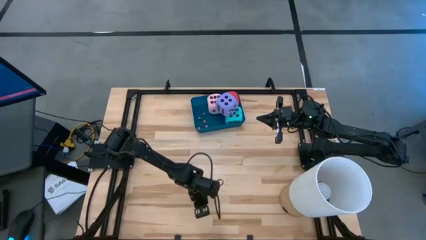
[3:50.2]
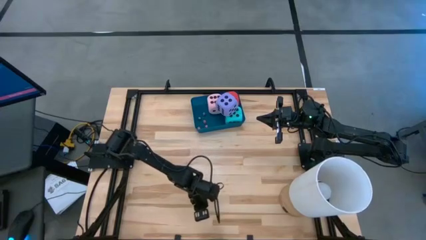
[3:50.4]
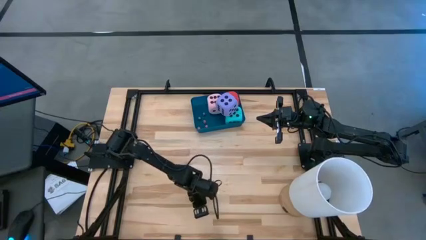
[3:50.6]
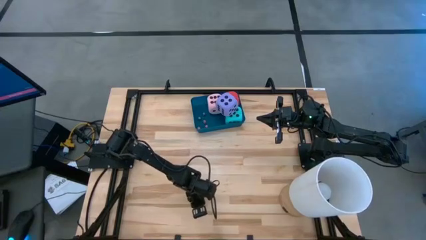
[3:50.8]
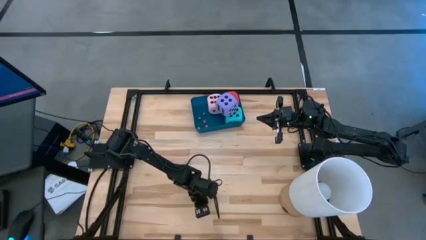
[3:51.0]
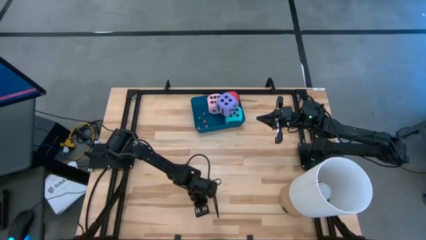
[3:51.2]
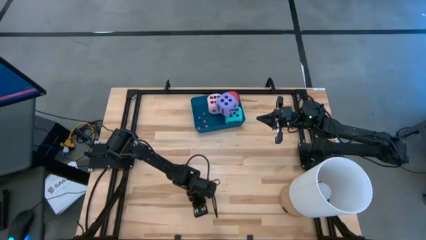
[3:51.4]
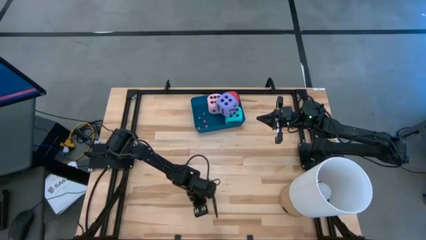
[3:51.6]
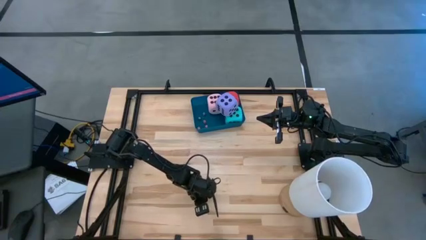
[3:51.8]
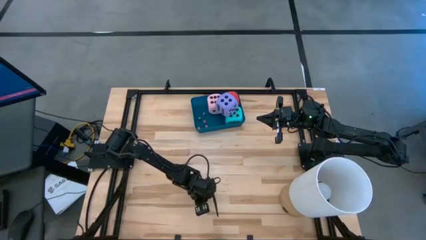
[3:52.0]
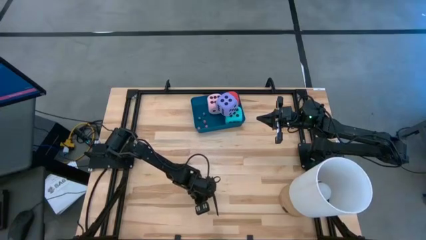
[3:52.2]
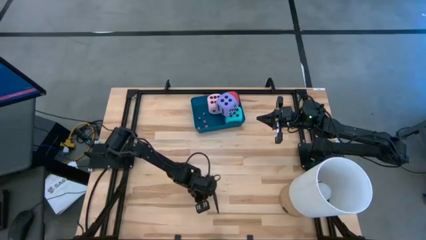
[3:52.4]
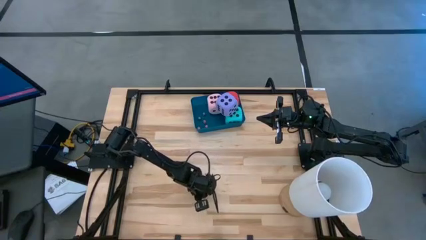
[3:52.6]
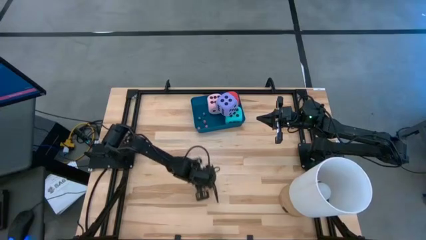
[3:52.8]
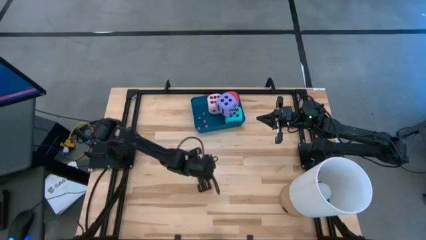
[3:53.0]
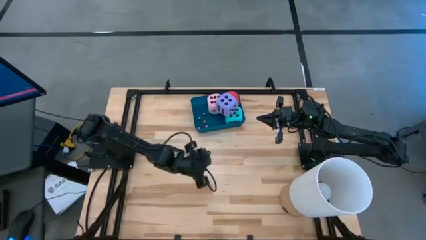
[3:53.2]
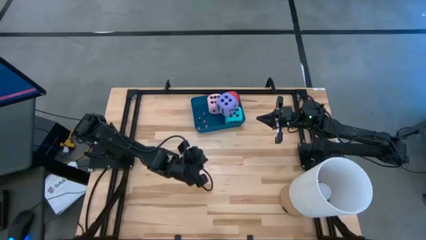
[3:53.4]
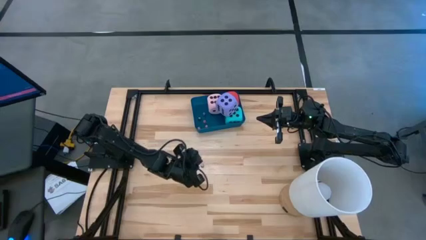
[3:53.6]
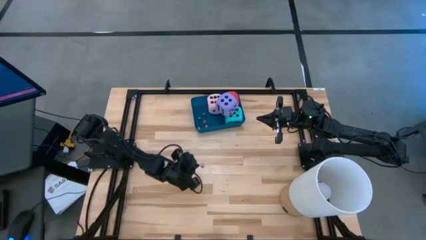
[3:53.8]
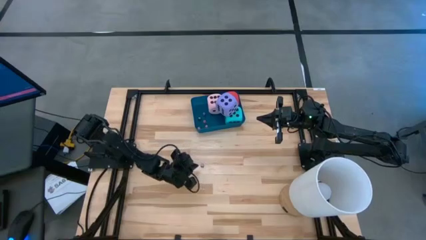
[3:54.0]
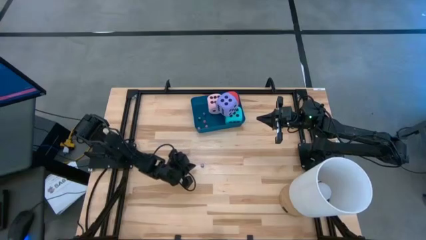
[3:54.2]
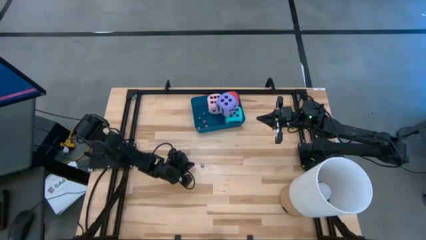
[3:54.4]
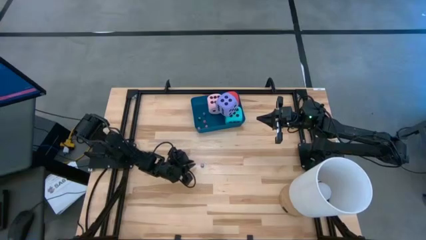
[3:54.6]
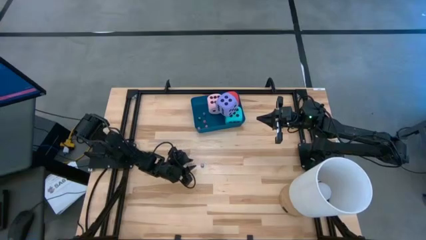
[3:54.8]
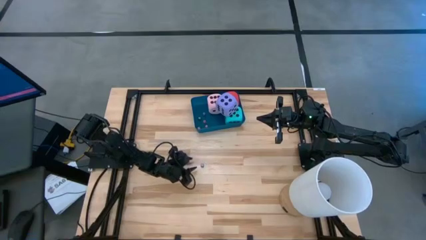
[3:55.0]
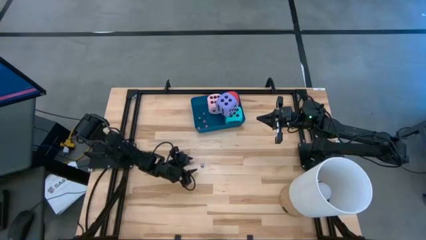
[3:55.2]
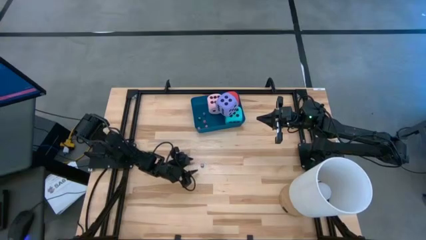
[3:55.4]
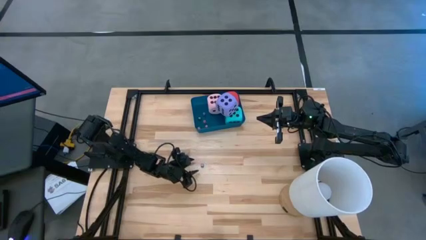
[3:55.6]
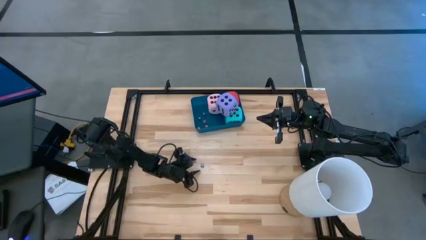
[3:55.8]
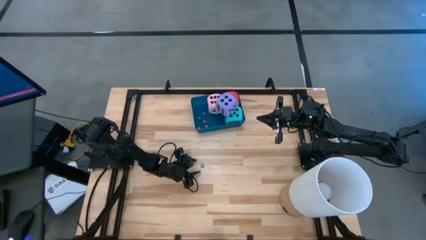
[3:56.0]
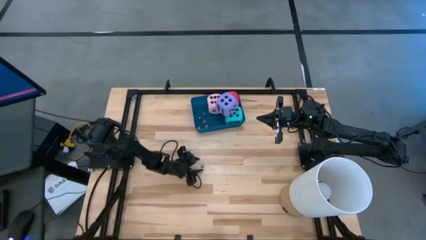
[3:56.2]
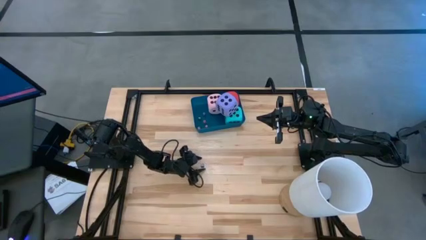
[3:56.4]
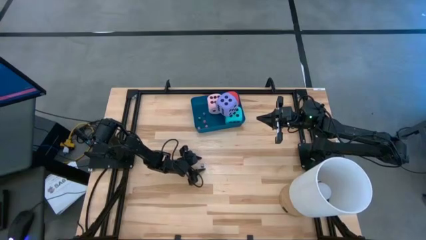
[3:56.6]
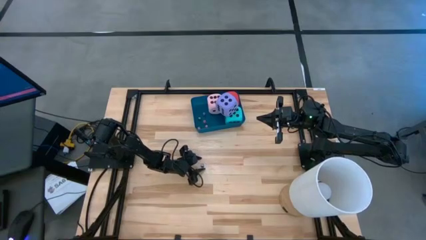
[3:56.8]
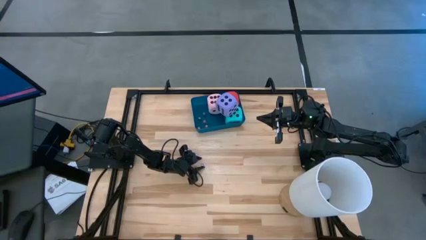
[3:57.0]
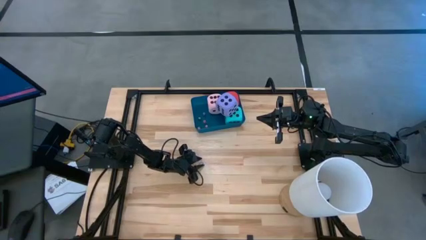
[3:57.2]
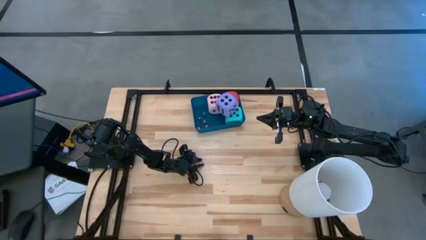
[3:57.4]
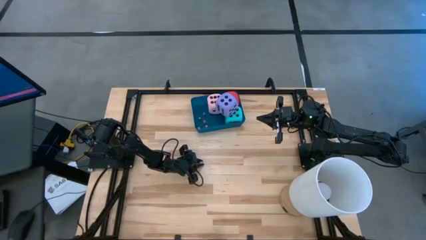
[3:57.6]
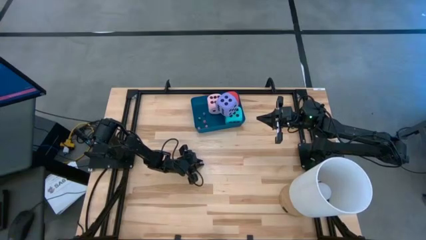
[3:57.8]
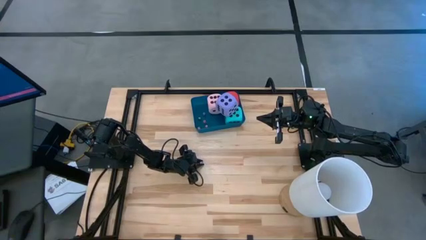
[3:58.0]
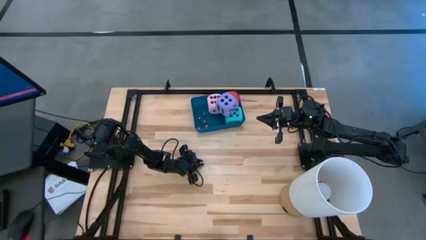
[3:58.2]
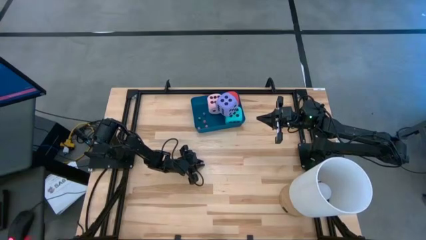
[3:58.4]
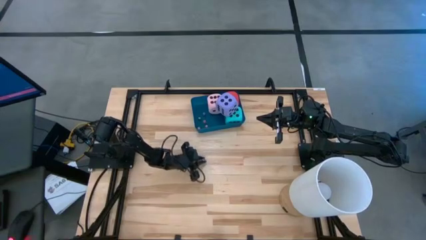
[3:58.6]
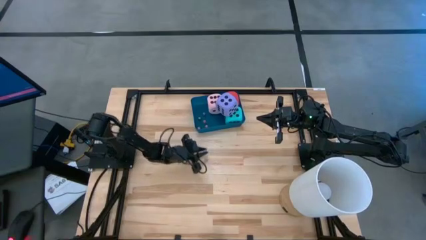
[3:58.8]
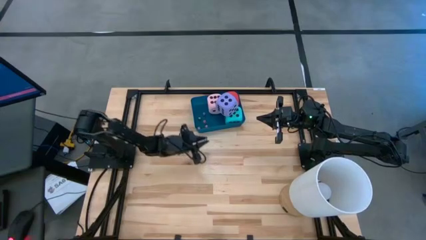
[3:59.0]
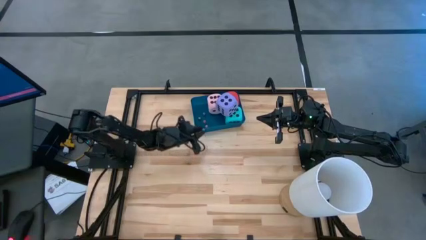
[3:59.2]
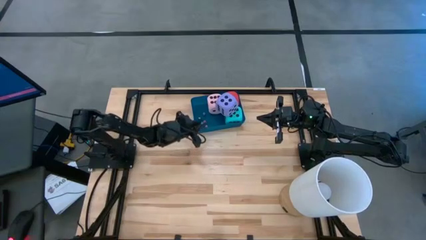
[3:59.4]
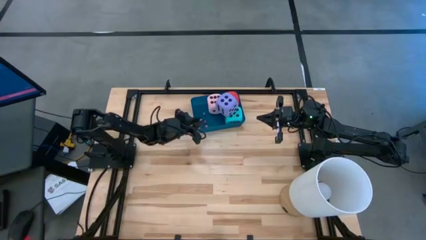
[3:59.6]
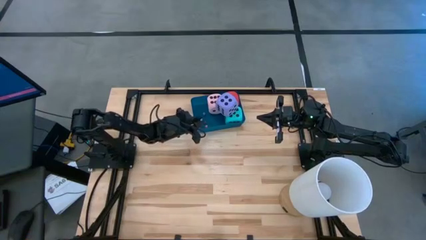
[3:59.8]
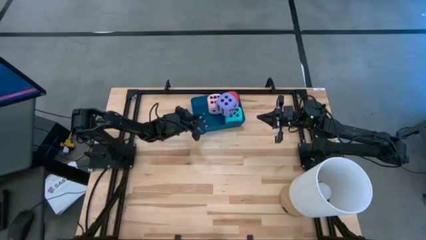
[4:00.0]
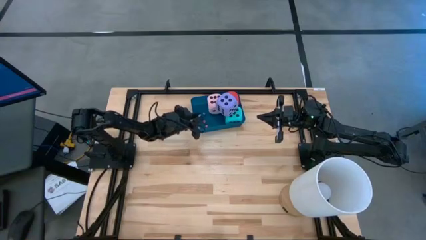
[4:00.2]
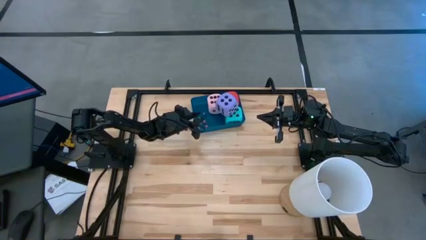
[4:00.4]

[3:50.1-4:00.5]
Task: Pick & Place Dice
Put the small blue dice into the blue bin
